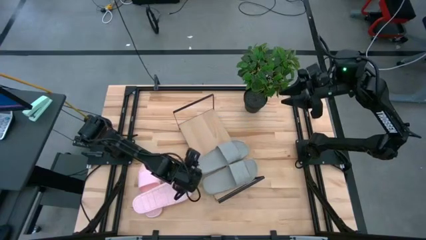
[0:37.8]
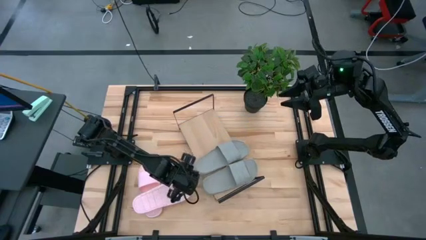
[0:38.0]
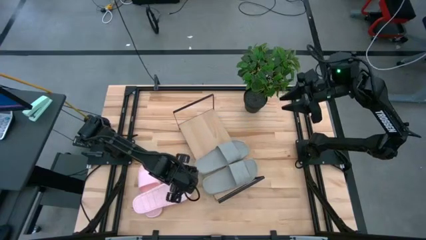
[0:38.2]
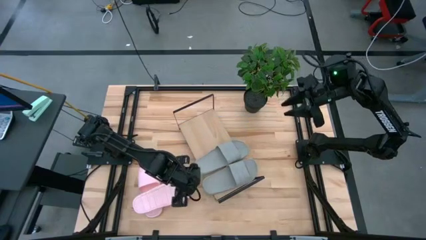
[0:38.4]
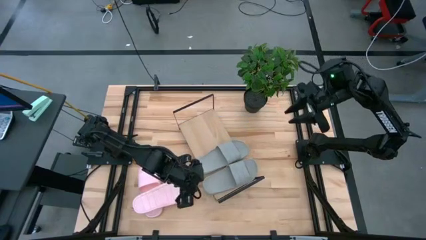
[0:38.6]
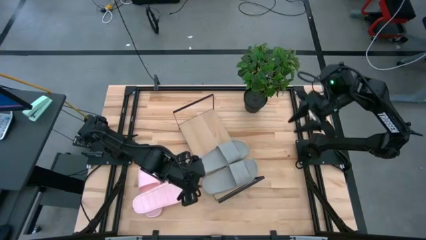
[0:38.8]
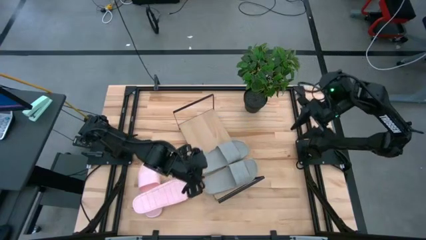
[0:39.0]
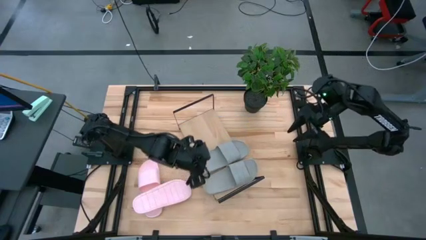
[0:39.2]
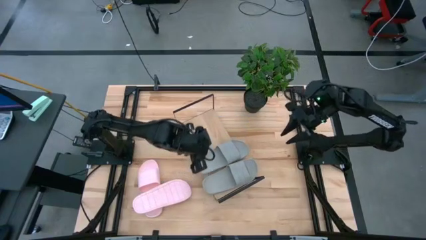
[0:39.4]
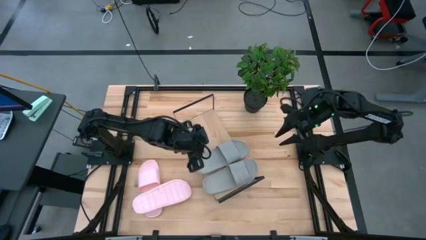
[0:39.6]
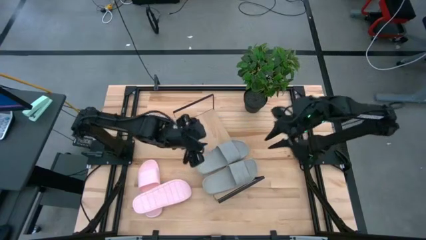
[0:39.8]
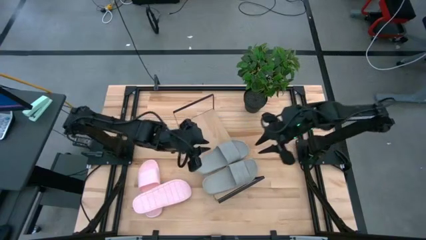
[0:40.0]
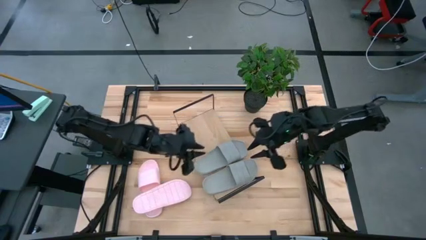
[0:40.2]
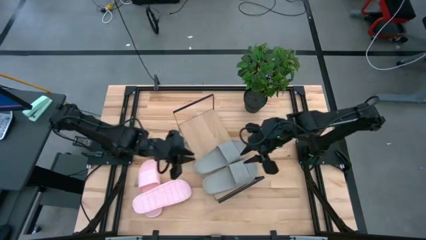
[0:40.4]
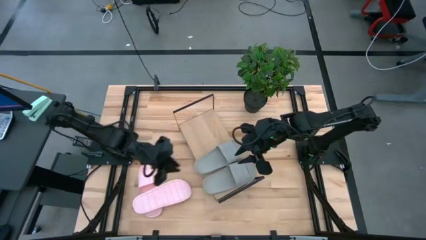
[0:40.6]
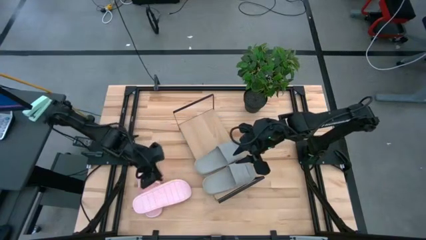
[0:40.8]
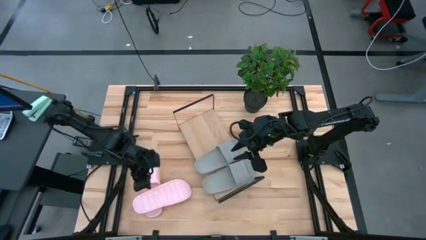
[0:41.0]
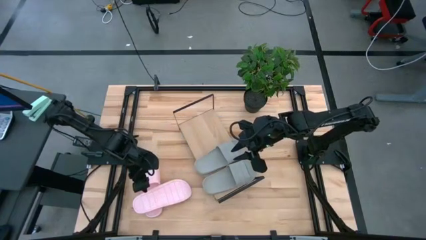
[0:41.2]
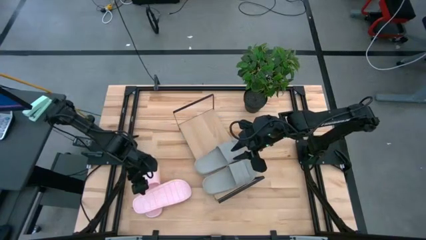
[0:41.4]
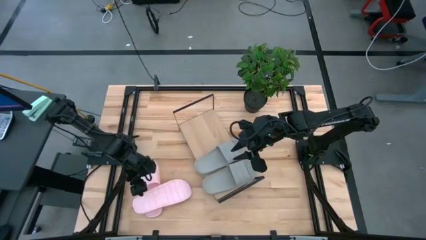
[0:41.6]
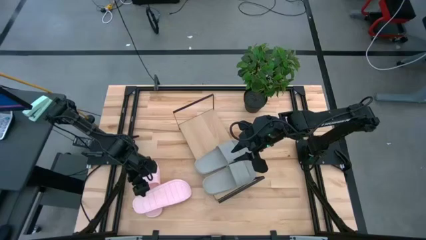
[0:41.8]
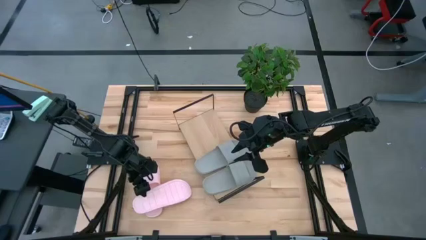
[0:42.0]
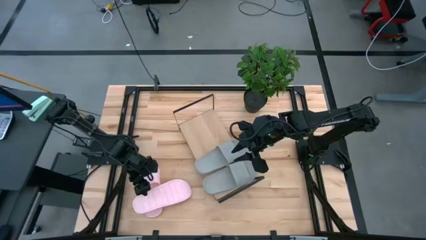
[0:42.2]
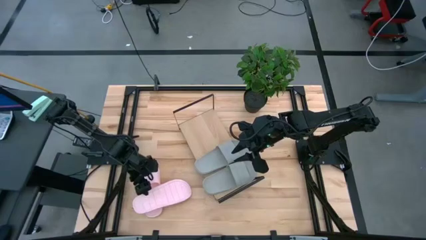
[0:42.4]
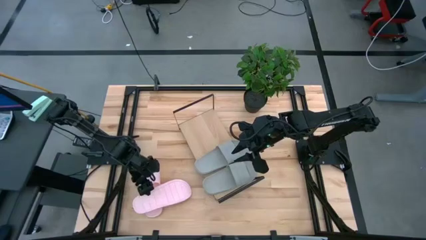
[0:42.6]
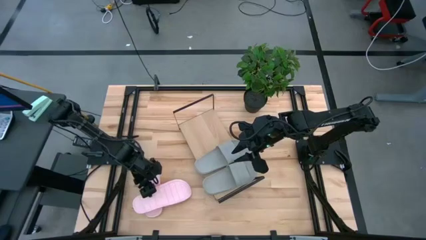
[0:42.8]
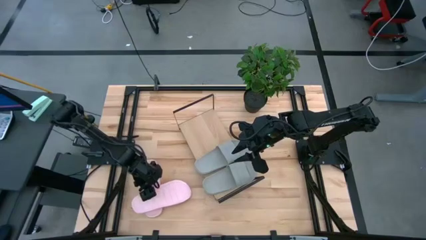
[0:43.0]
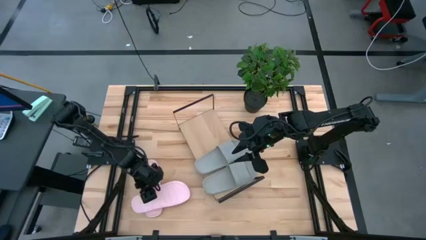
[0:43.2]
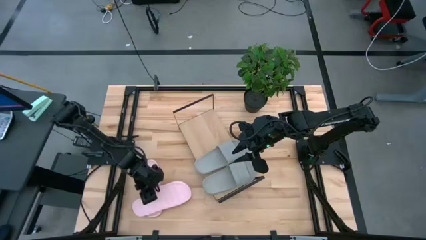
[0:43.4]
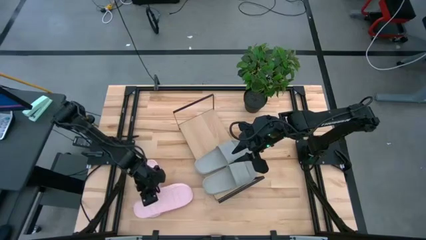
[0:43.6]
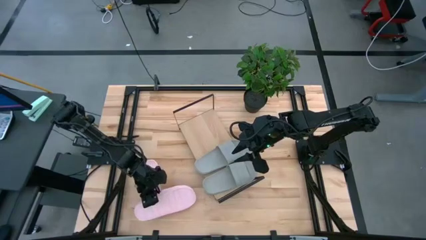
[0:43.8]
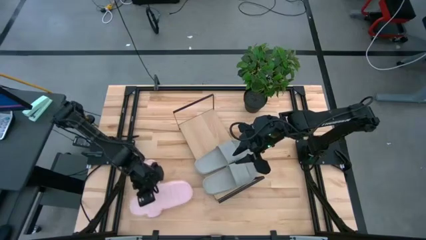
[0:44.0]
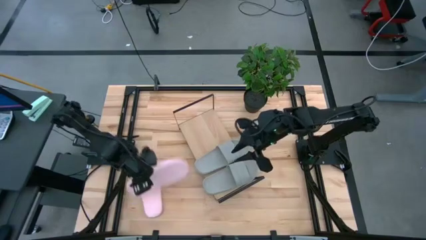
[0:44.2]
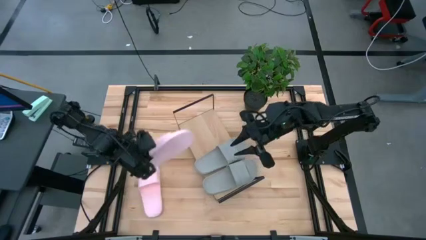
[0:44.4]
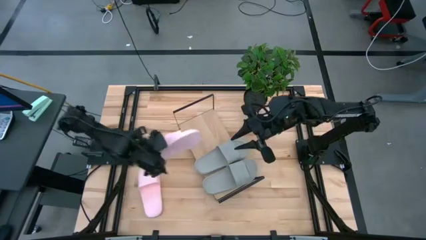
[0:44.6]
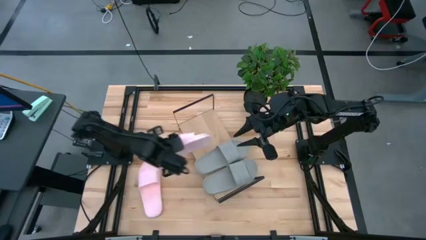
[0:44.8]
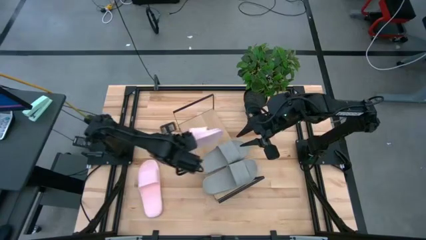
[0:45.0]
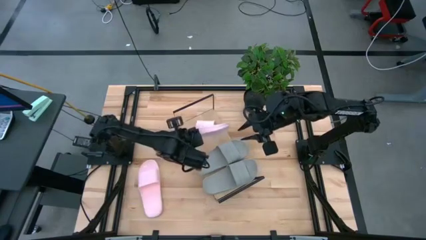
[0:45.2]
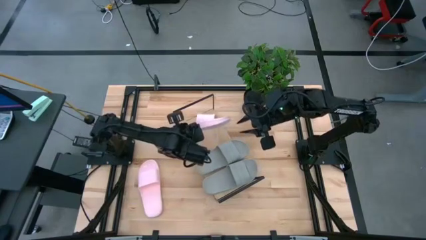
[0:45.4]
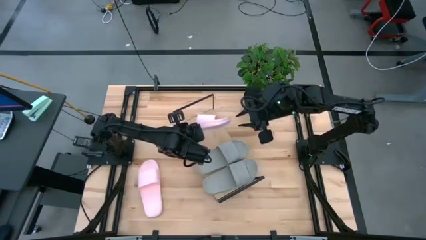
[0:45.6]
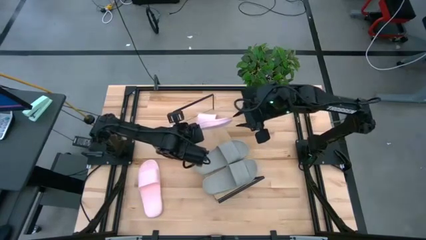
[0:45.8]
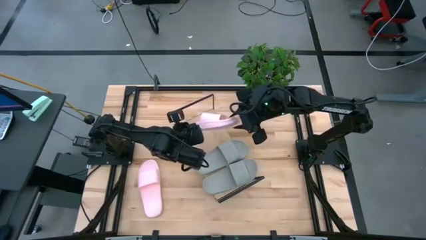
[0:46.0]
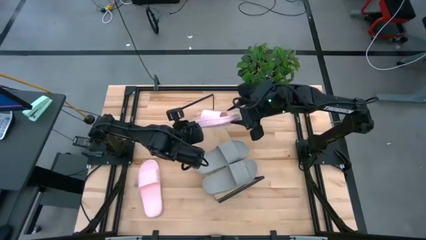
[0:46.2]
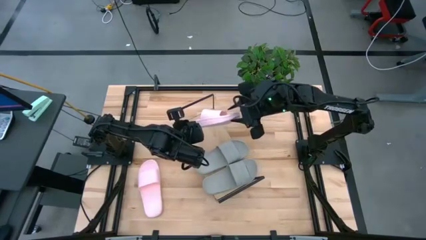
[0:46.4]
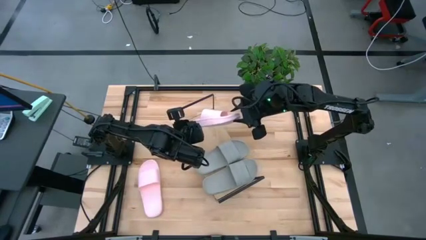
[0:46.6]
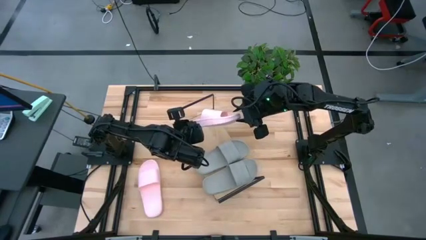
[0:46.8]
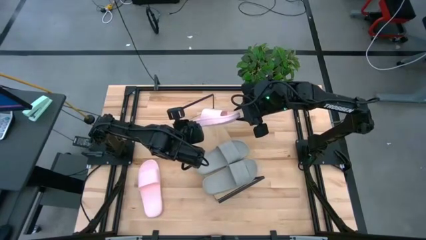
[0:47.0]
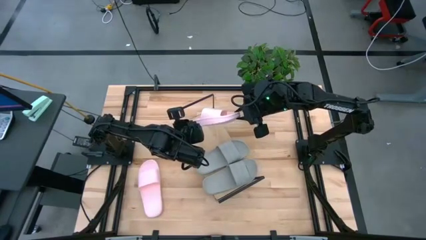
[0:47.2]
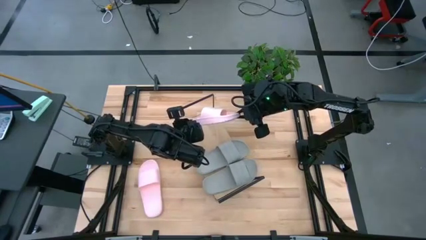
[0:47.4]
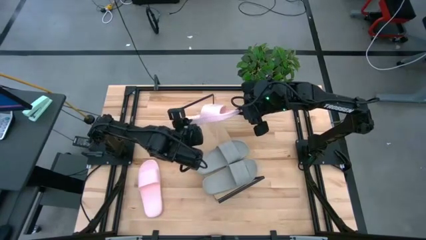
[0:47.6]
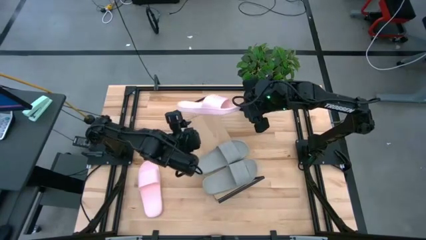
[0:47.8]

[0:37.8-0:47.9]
Task: Pick and place slides into the shelf
Put the bottom pink slide on the shelf
